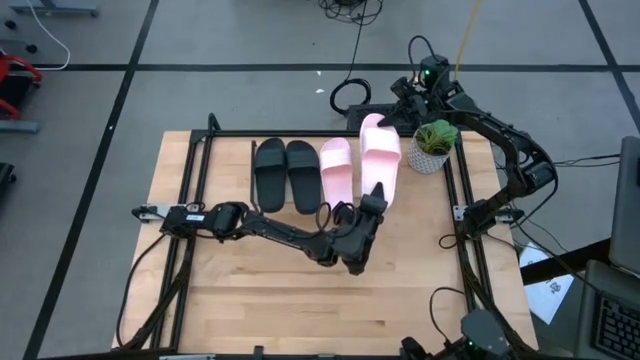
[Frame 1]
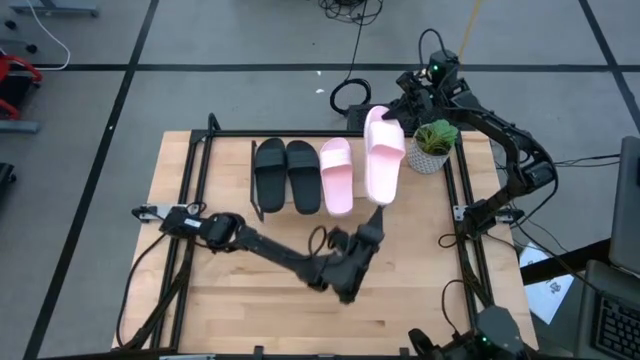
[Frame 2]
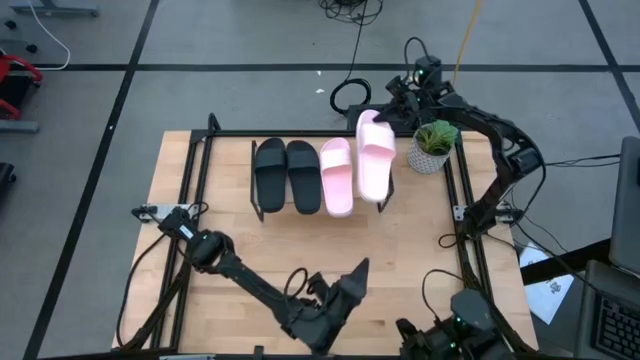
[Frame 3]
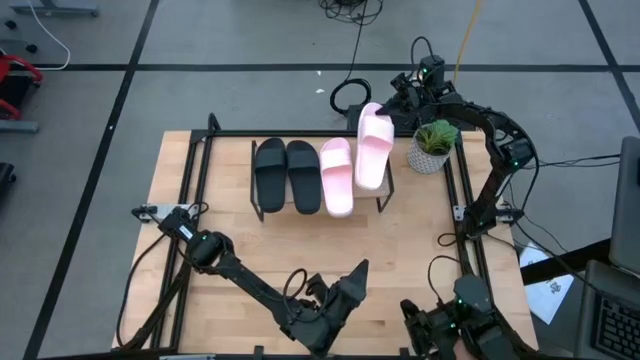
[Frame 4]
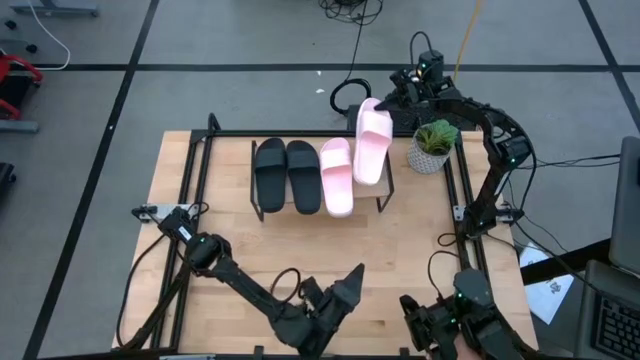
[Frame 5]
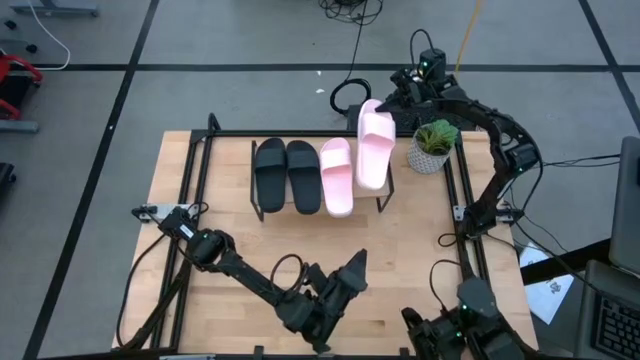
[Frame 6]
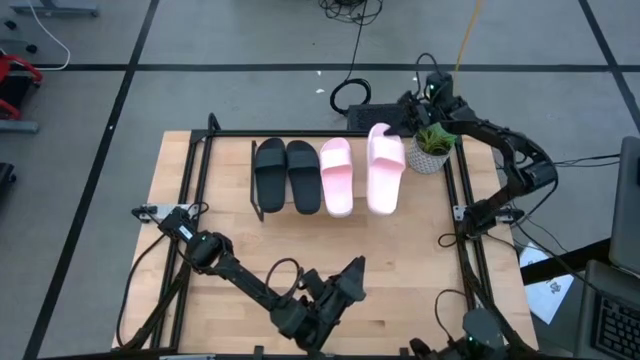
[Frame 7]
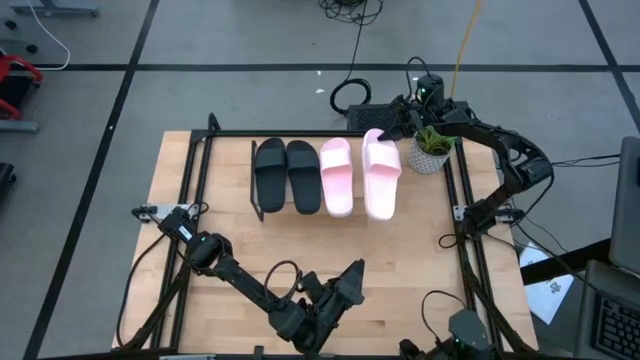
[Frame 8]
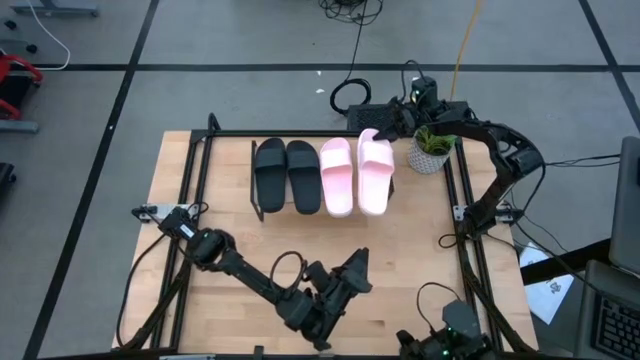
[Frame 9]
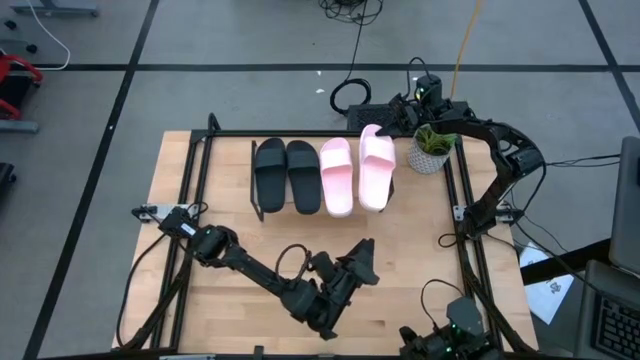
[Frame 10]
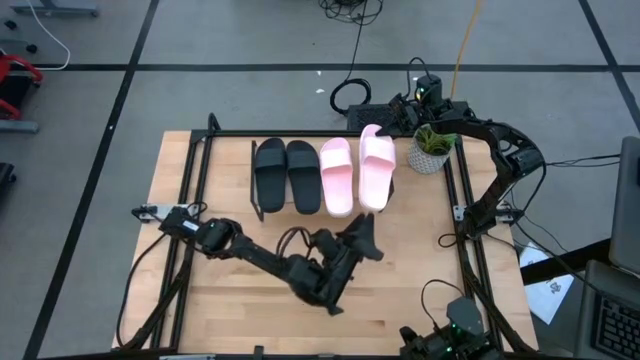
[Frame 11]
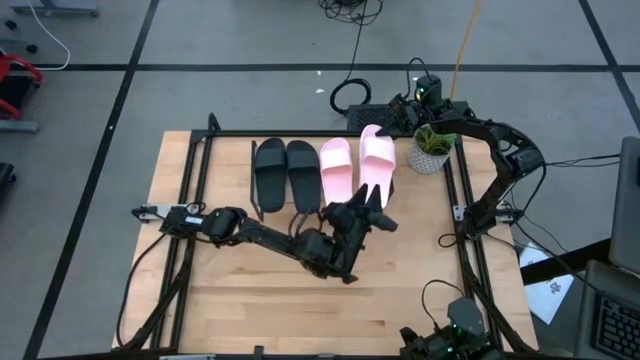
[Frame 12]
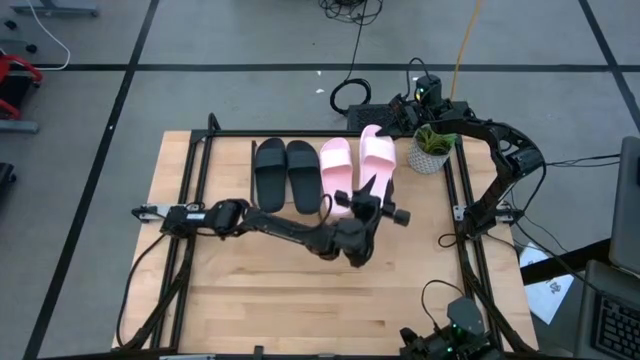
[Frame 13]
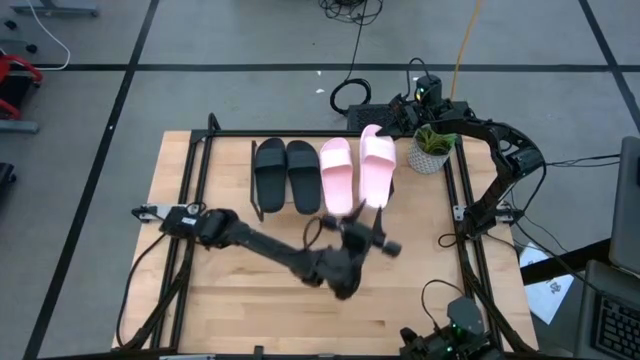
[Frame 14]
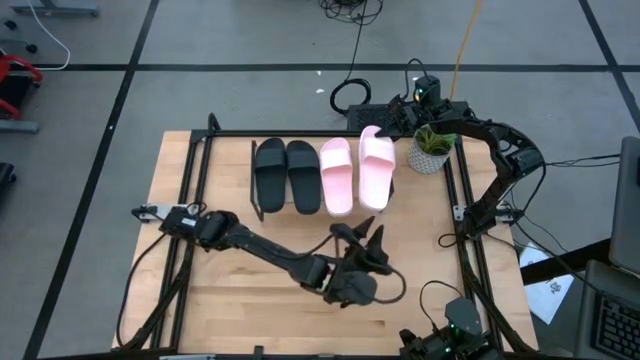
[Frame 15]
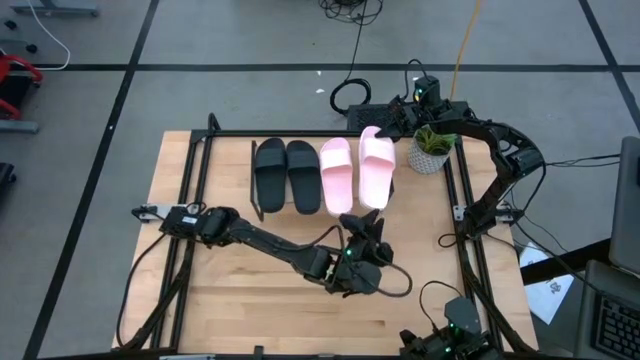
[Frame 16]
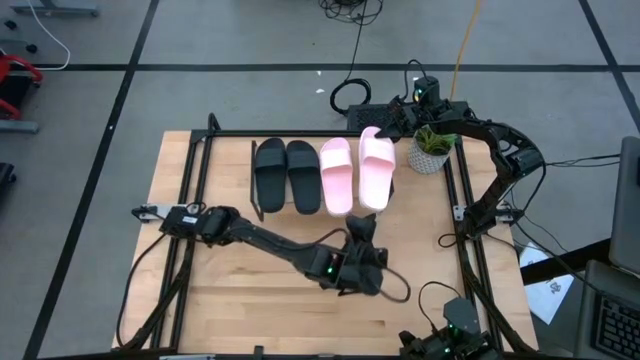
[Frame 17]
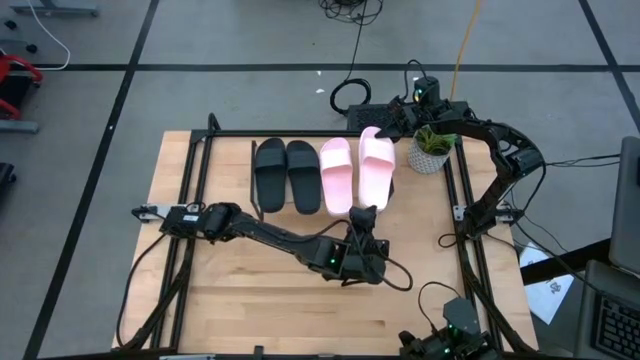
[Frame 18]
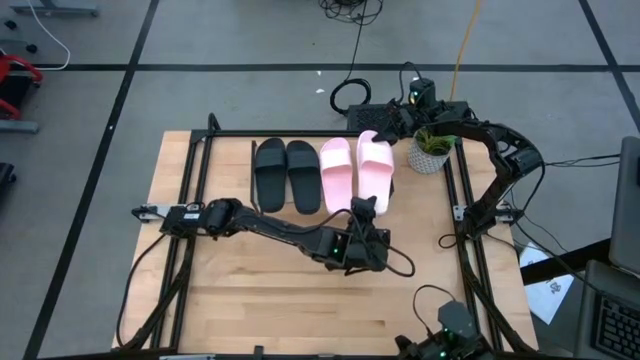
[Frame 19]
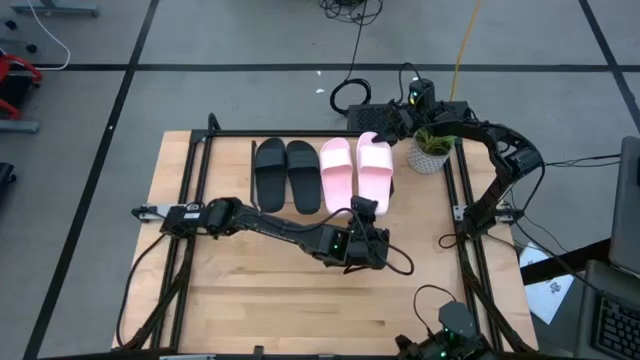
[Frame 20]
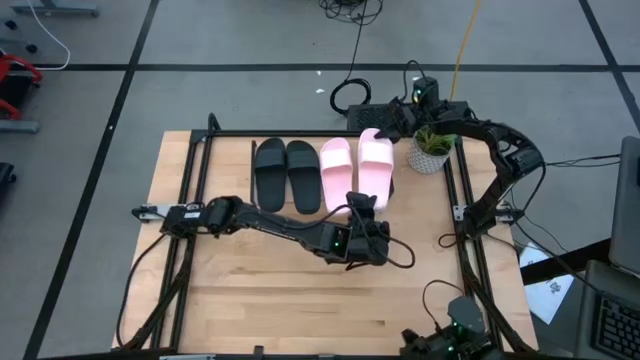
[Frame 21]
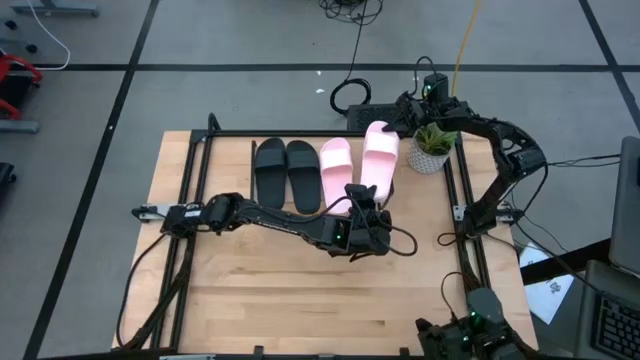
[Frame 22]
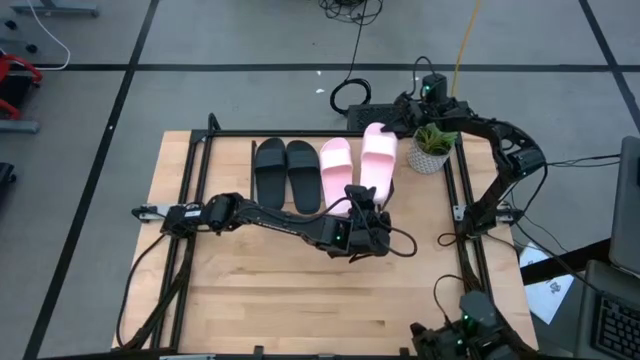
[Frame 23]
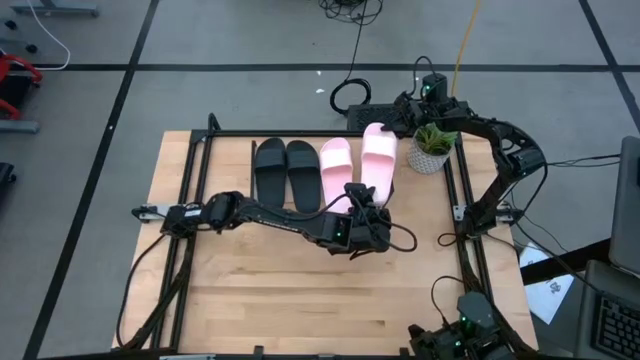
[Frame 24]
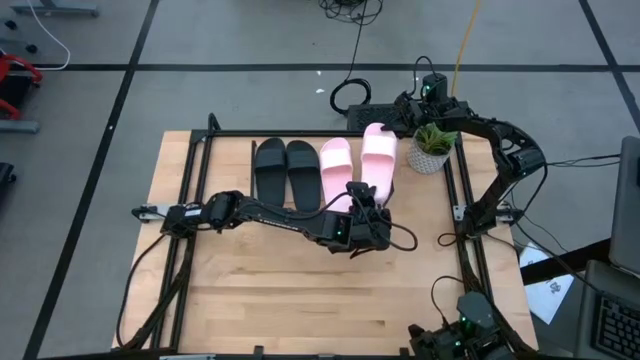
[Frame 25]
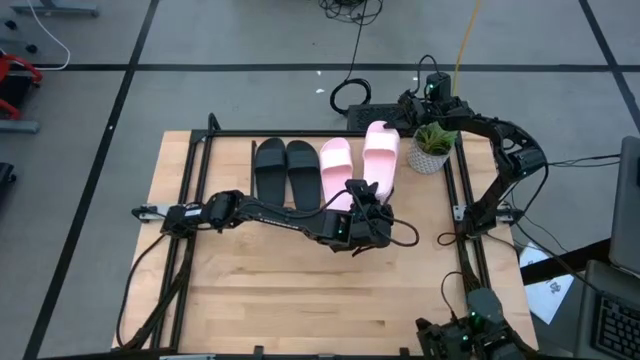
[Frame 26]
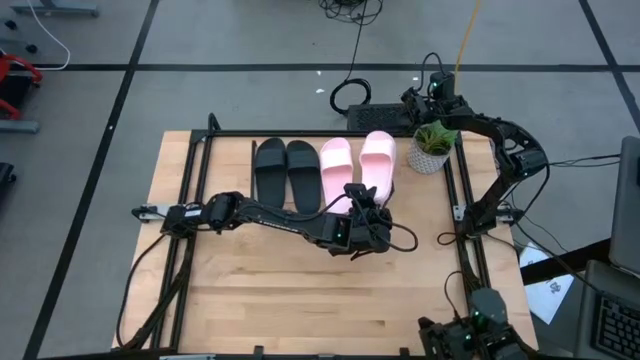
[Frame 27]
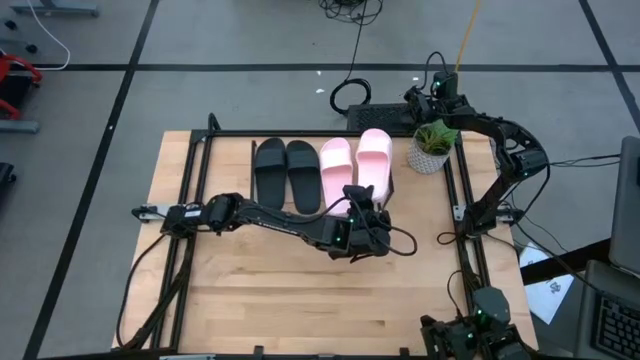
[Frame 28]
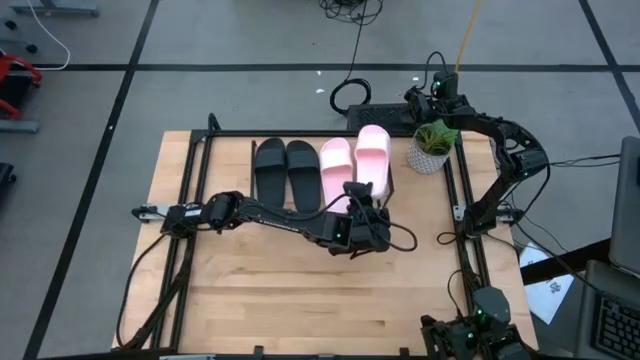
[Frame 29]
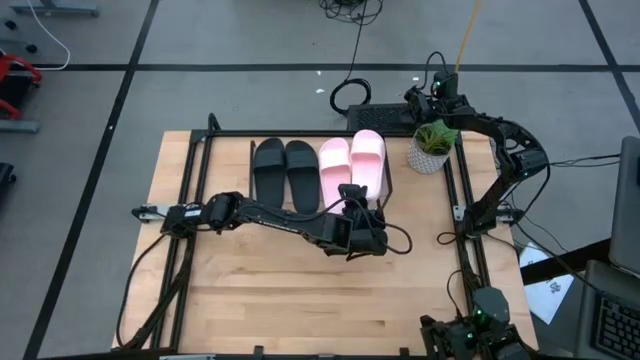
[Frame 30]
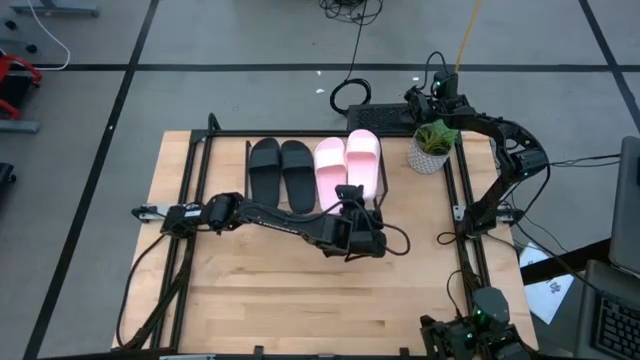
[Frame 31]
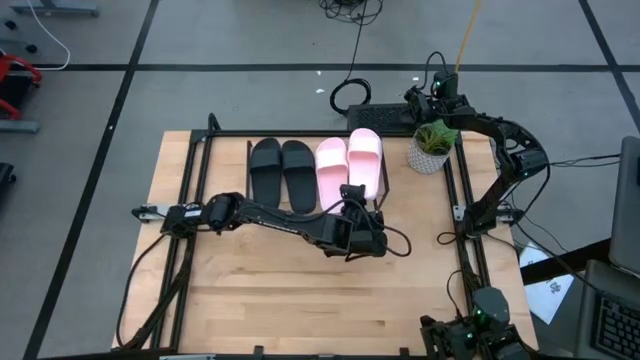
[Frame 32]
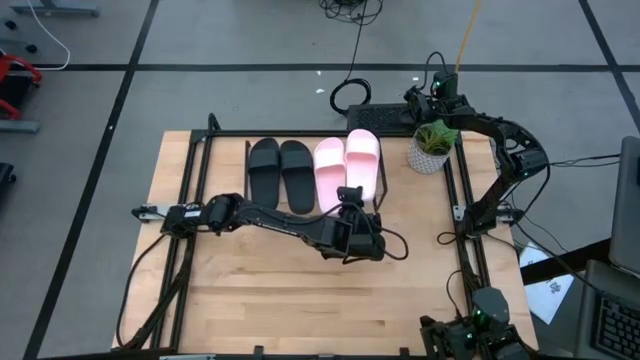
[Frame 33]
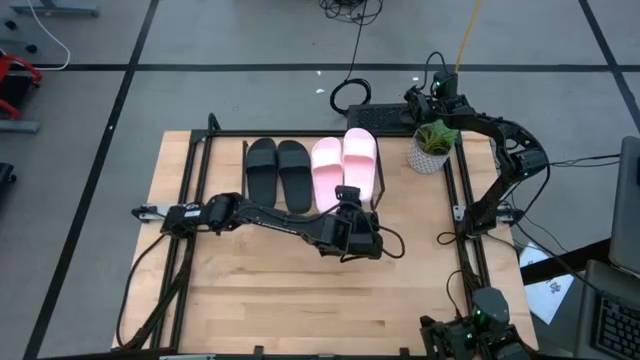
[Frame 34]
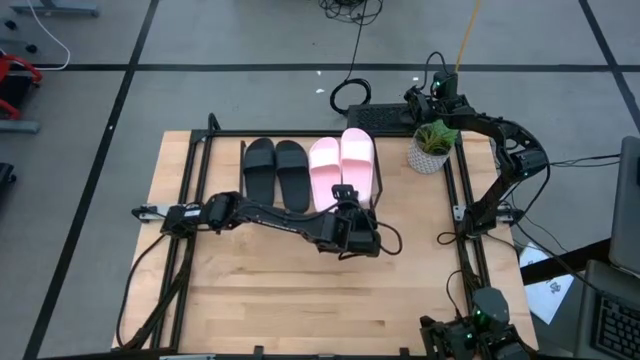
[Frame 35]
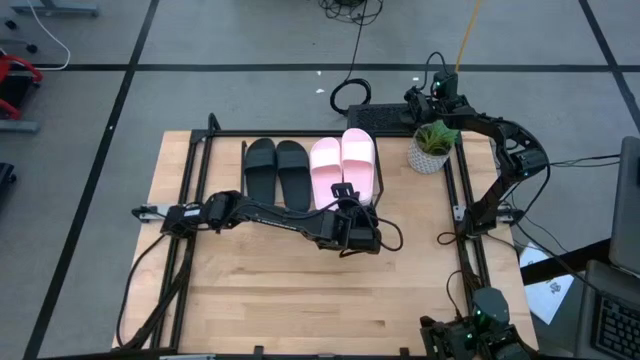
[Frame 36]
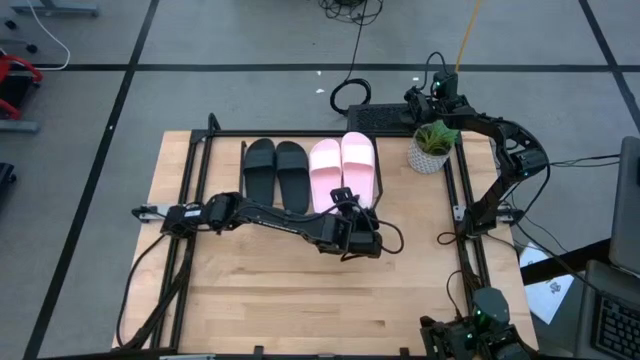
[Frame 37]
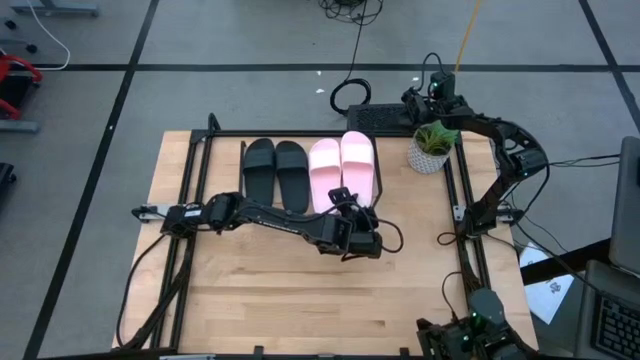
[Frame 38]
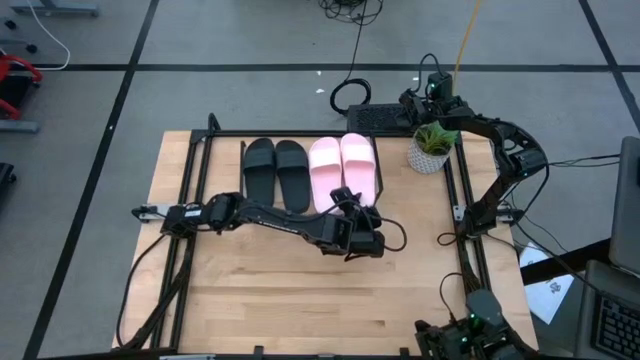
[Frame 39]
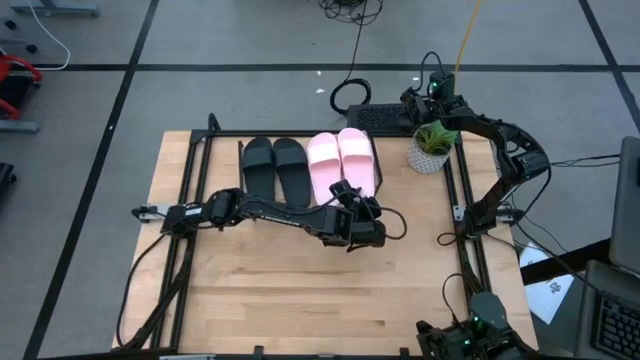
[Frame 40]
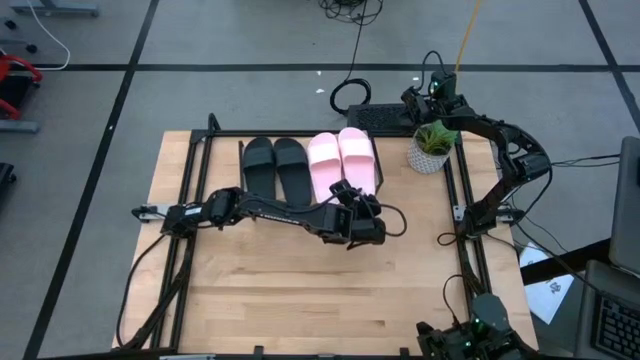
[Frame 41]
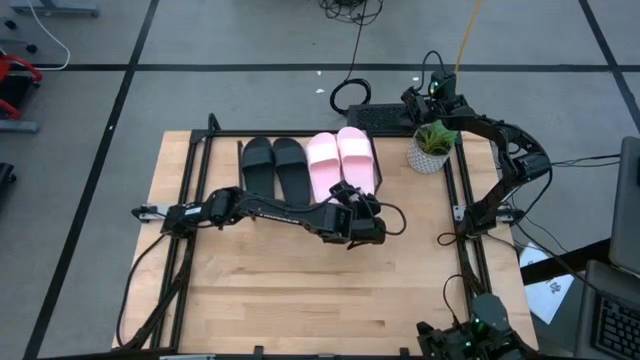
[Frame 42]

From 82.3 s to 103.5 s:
Task: Pick and place slides into the shelf
Put the pink slipper onto the shelf
